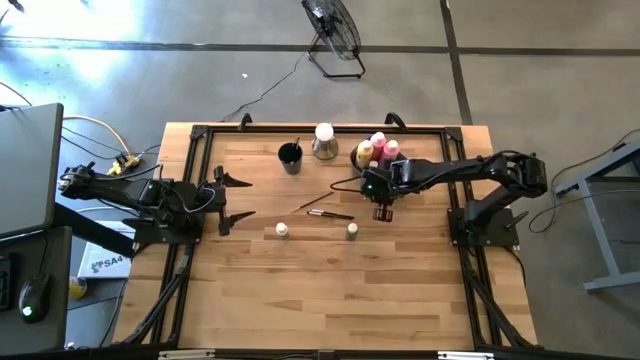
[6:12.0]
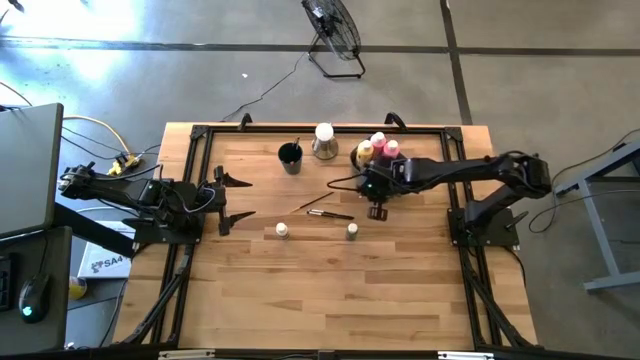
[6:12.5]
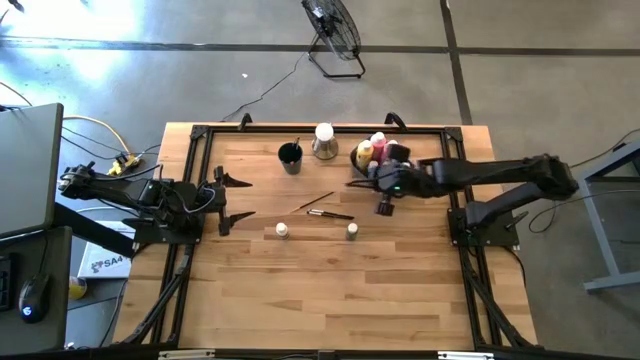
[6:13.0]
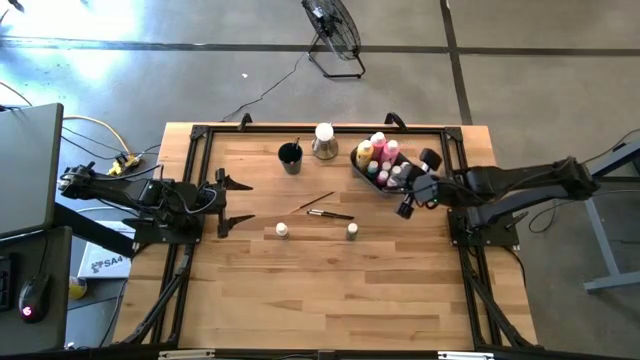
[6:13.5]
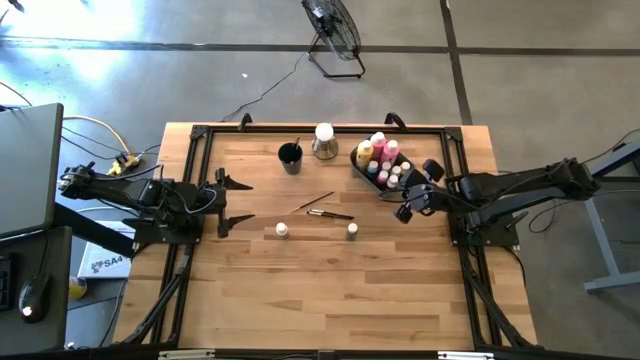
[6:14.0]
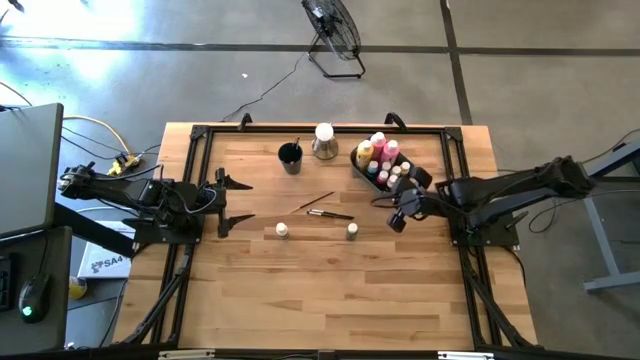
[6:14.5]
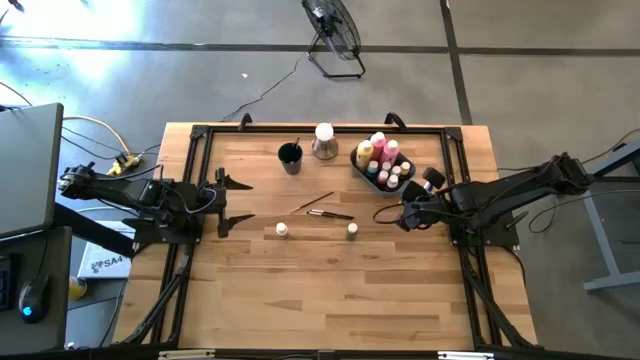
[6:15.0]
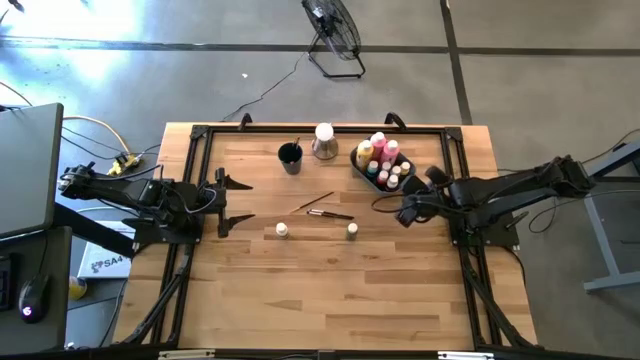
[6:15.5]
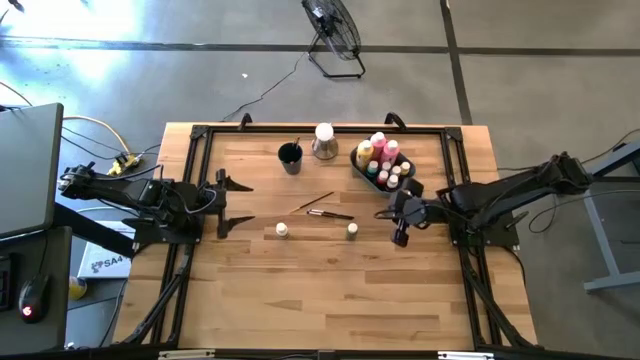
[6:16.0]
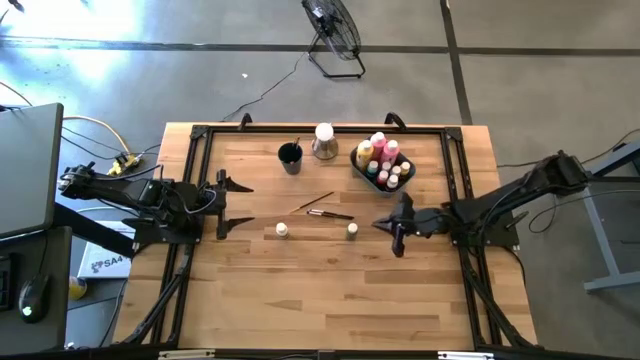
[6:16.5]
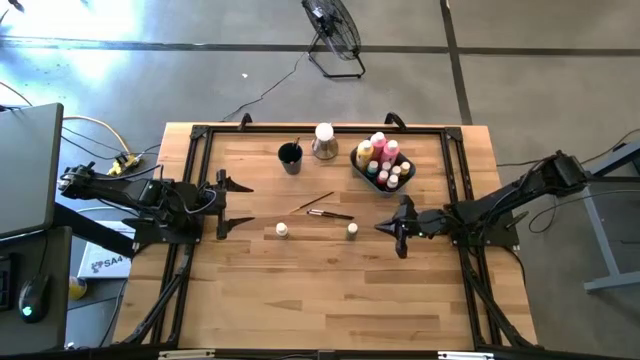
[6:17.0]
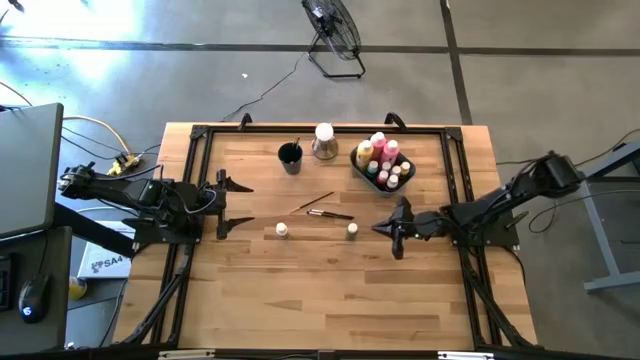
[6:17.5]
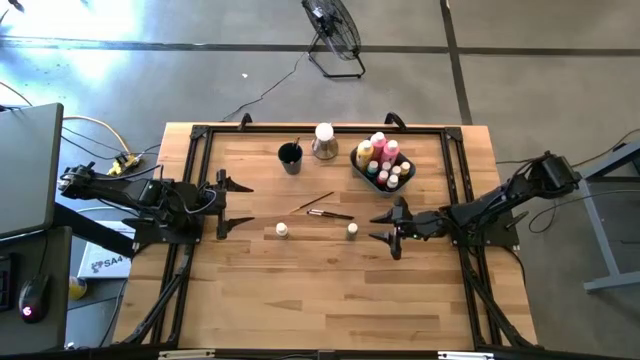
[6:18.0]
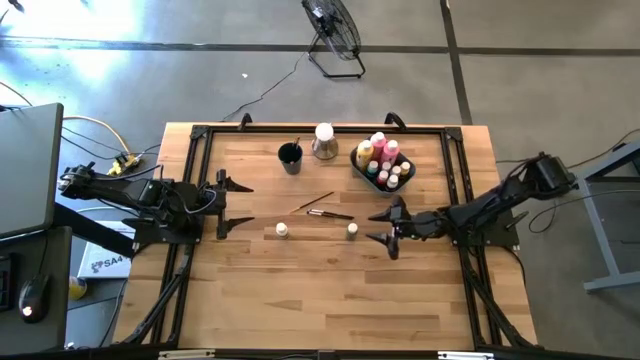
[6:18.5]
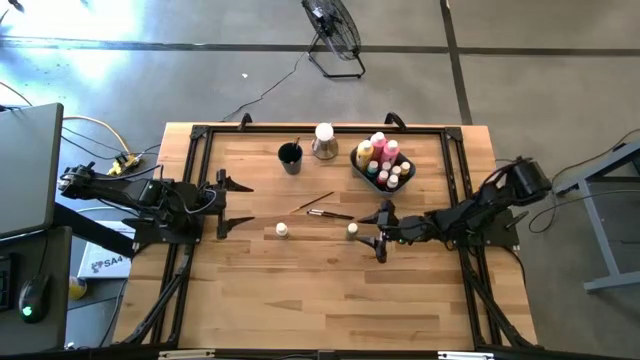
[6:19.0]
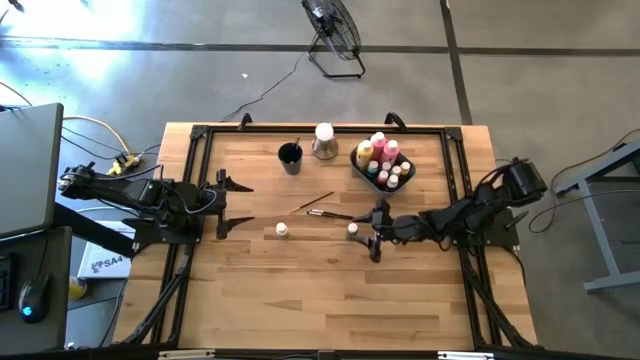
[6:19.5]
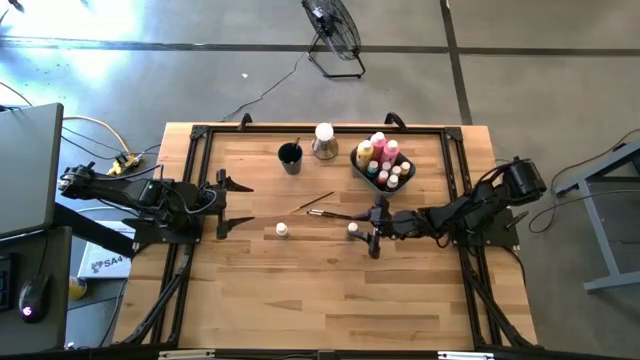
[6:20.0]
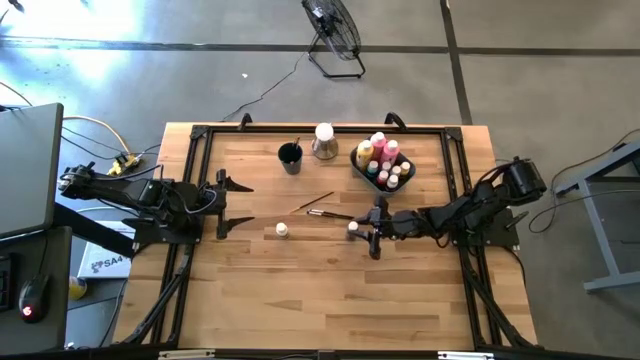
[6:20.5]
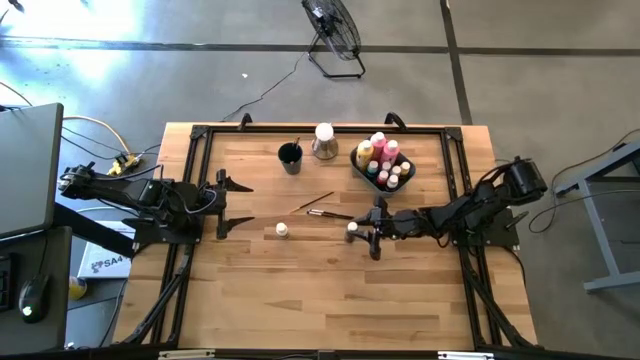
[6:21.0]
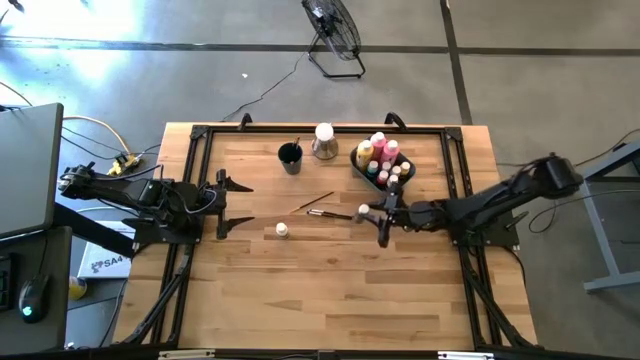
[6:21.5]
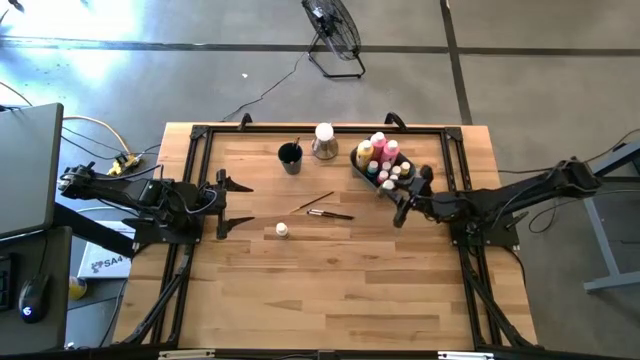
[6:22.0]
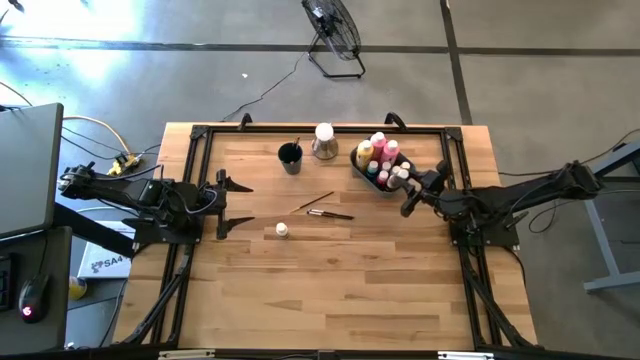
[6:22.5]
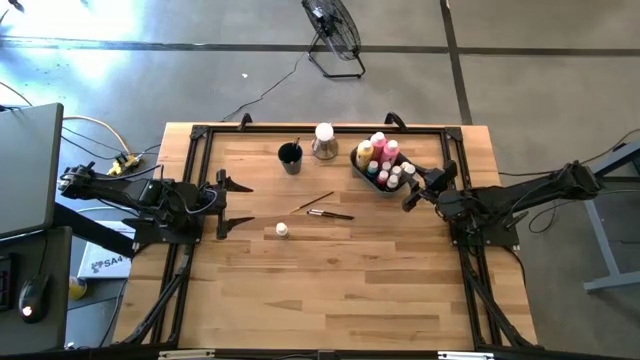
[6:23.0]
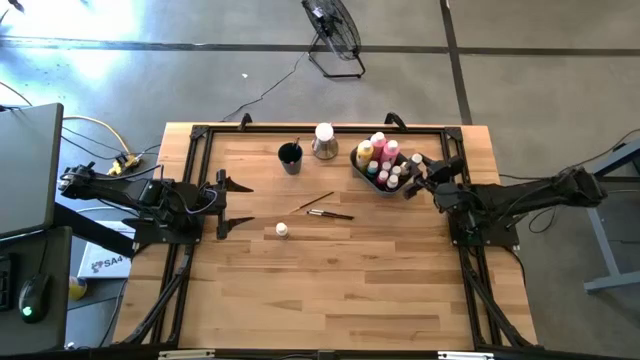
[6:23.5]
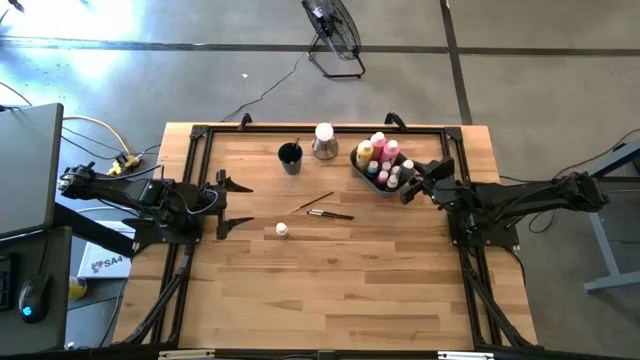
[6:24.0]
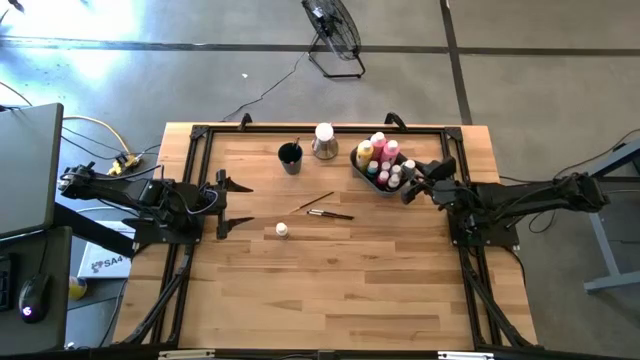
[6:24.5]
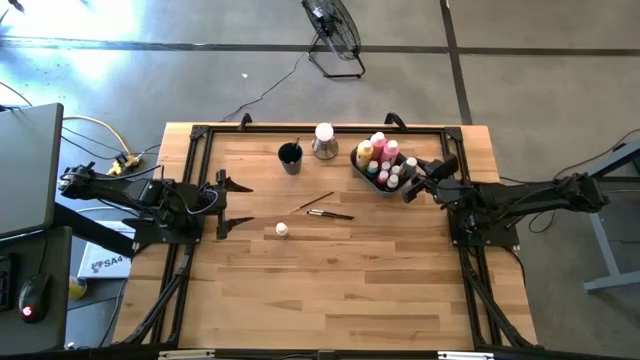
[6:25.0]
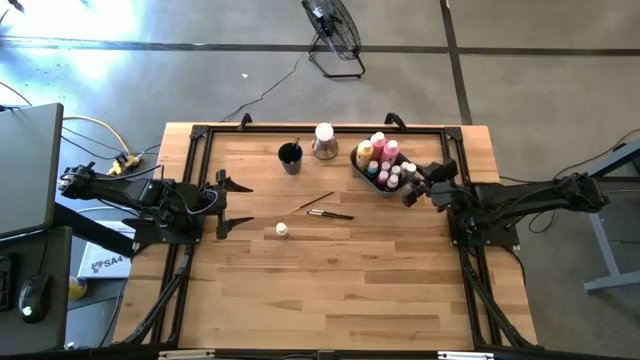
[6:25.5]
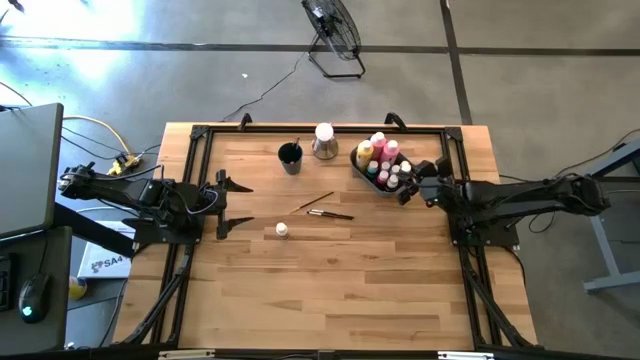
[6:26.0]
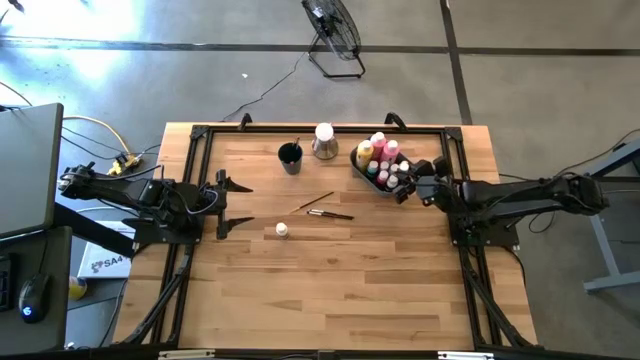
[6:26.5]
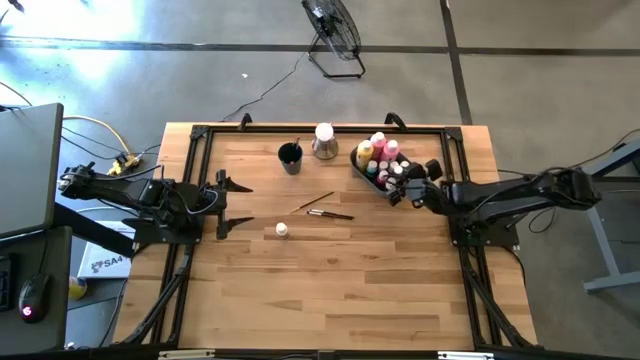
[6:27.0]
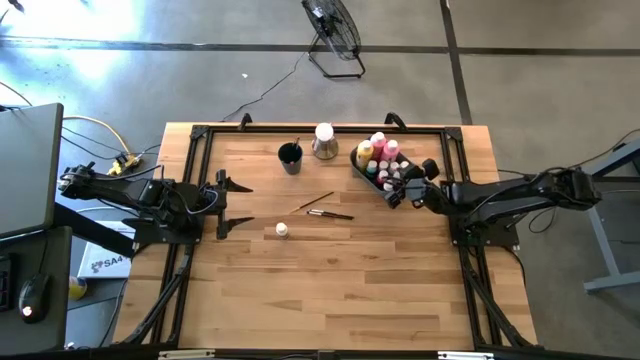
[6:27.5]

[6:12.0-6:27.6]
Task: Pick & Place Paint Supplies
Put the small green paint bottle into the blue bin
